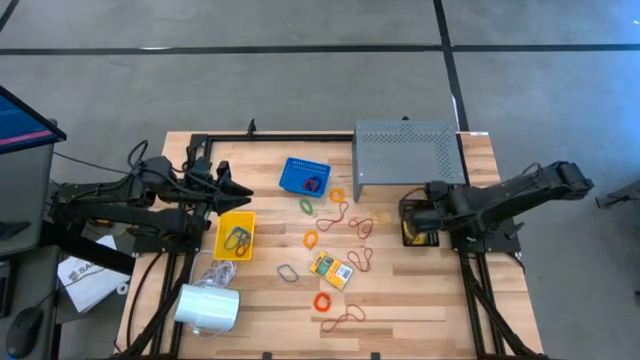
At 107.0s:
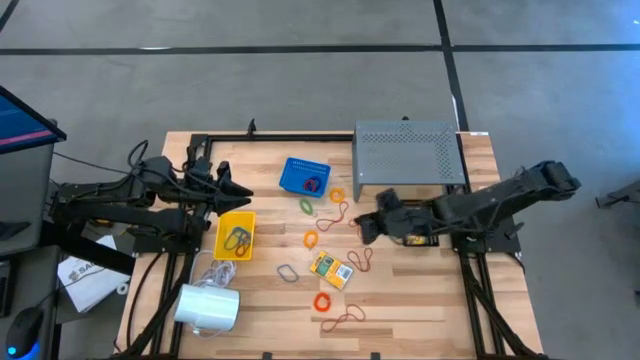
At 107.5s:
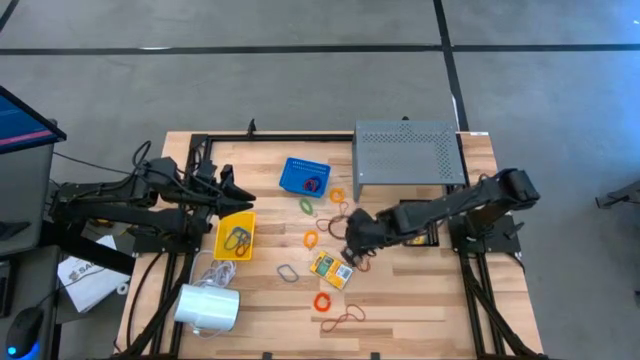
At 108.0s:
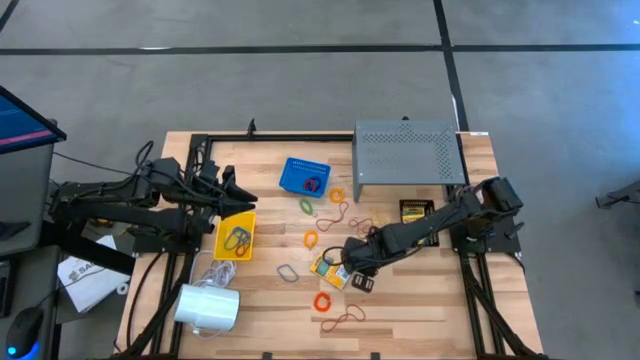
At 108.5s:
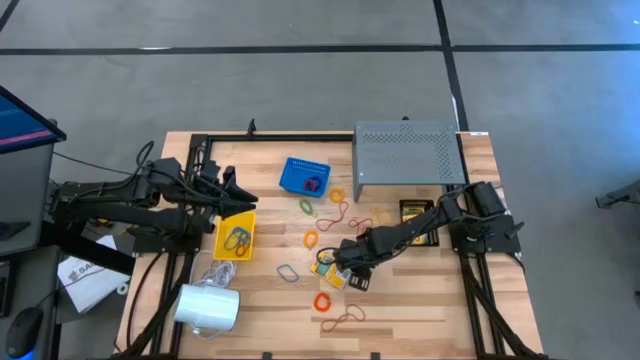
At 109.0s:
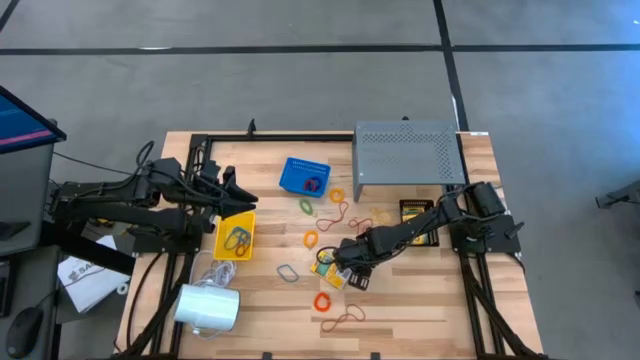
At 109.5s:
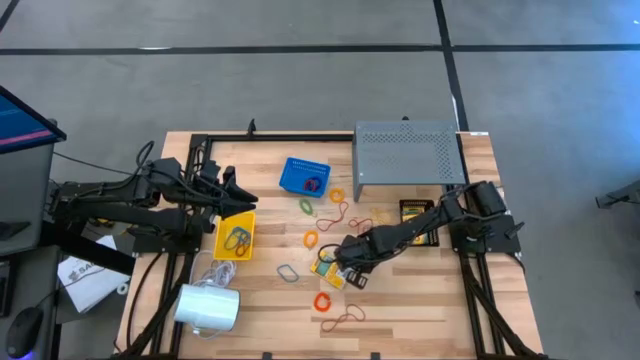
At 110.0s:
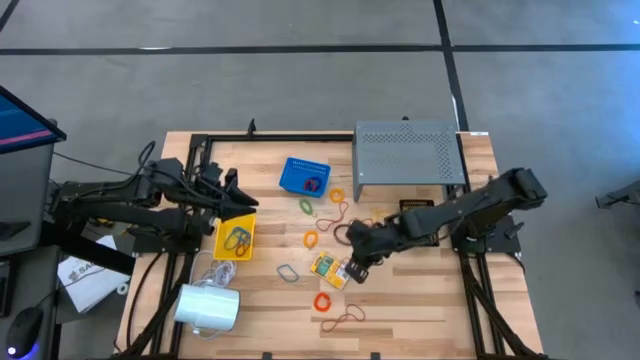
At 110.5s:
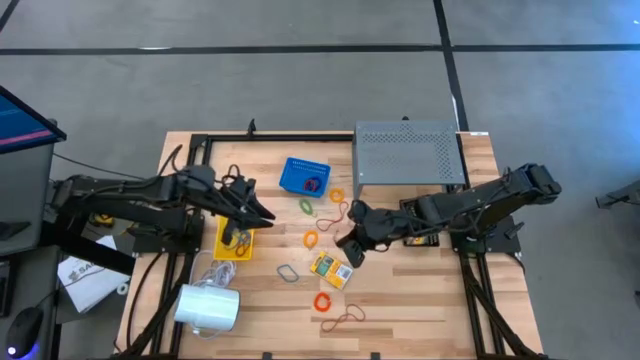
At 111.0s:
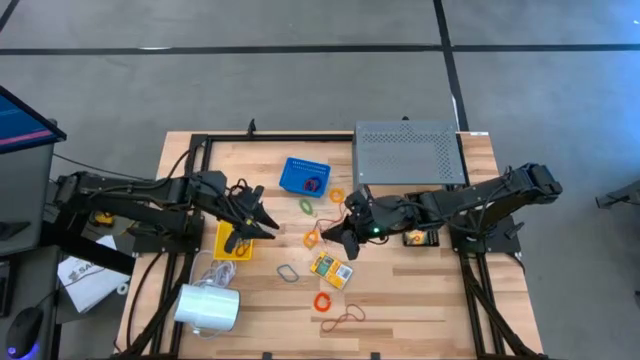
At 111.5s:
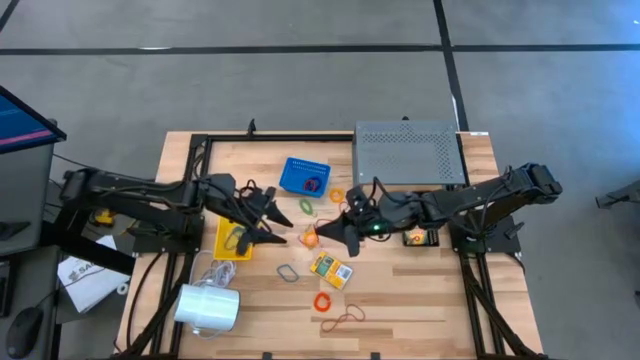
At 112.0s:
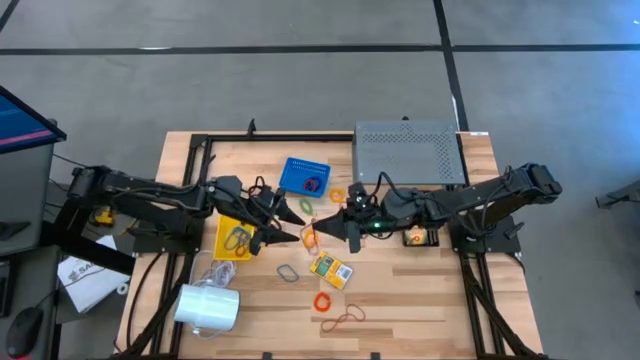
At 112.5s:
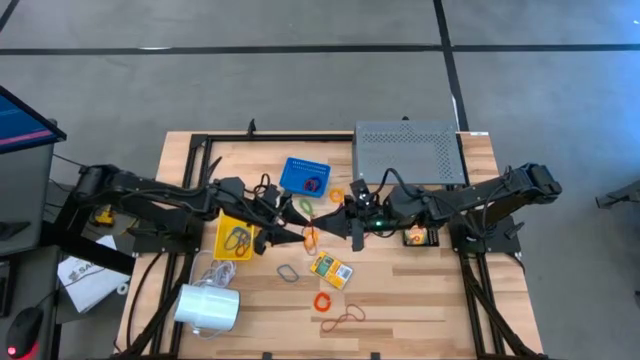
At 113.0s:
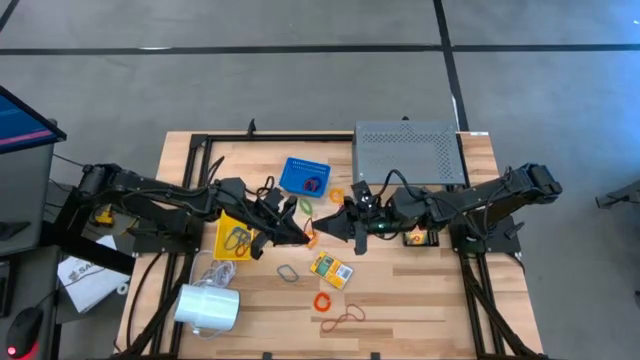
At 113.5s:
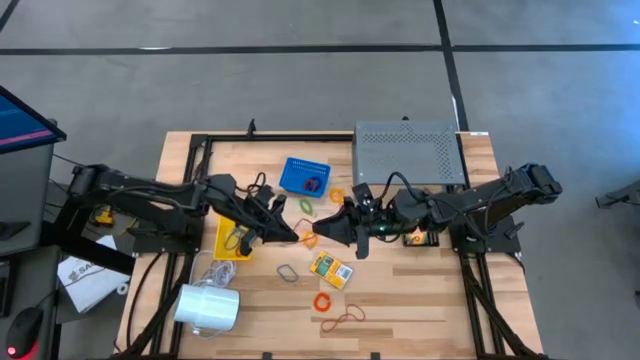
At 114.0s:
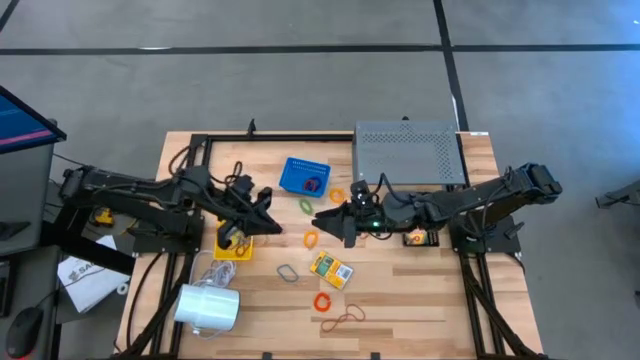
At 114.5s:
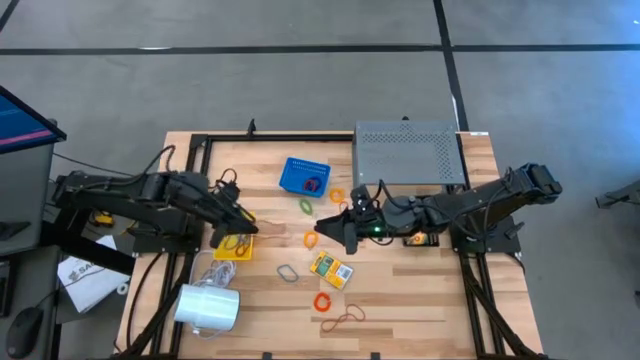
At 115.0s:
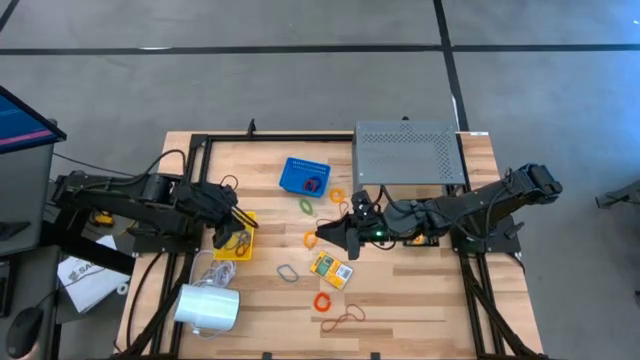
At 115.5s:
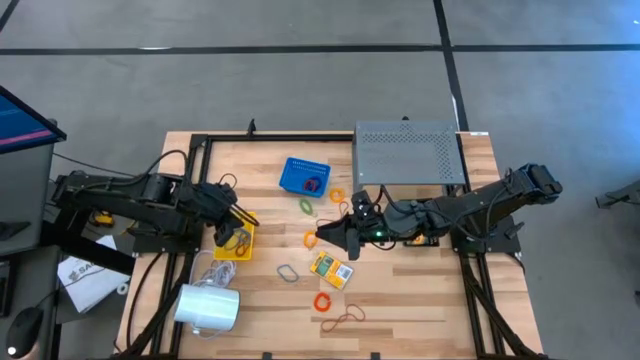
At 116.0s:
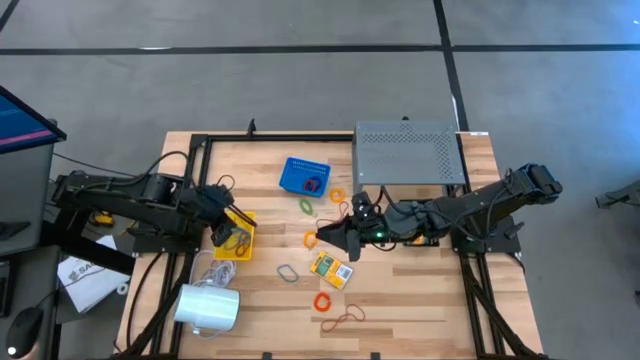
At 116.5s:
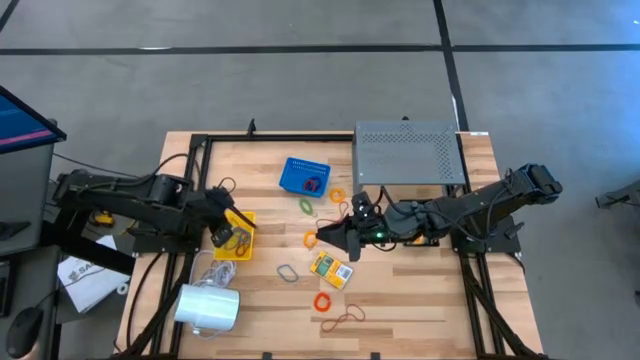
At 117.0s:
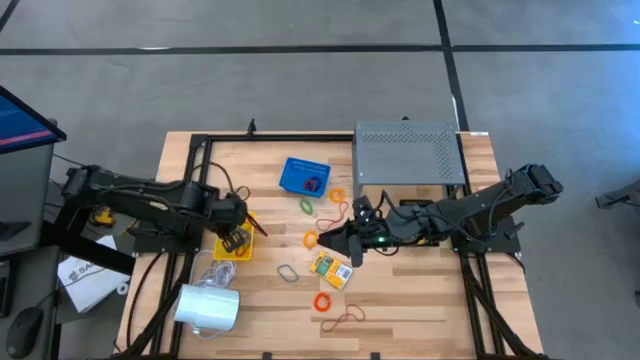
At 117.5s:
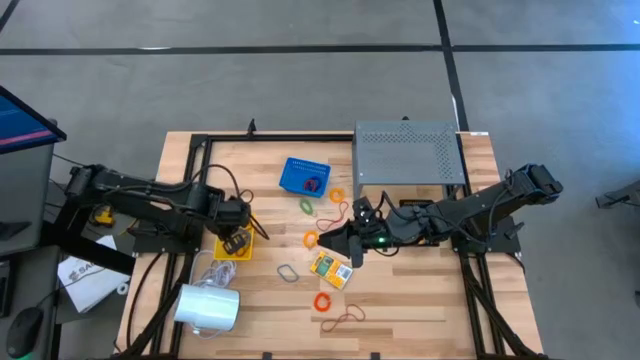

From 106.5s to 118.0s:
Task: Pick & Place Office Desk Supplies
Put the red rubber band into the yellow bin

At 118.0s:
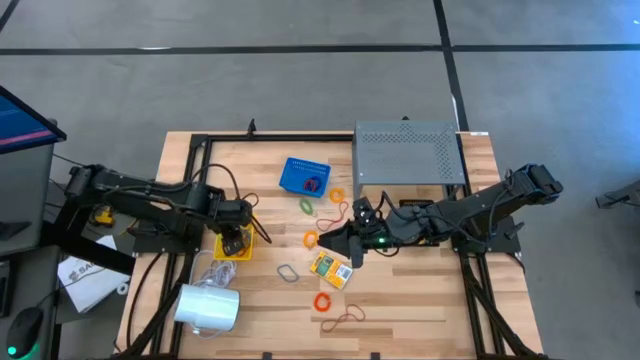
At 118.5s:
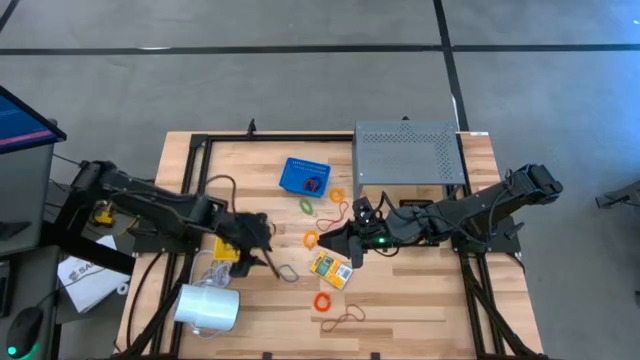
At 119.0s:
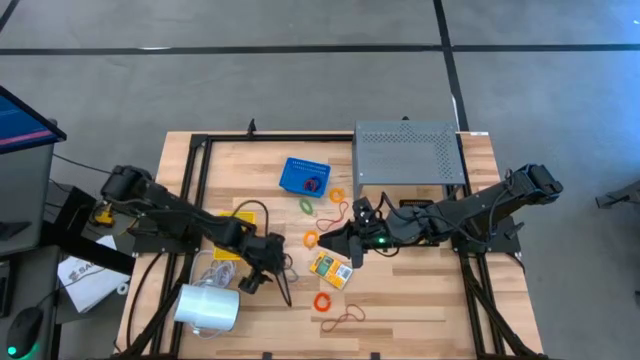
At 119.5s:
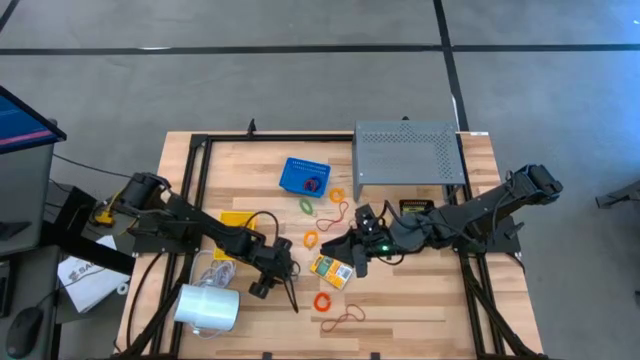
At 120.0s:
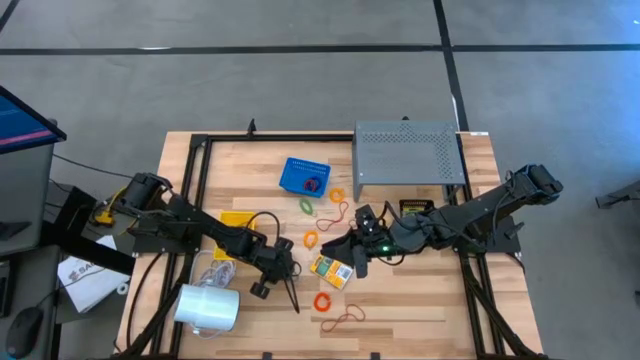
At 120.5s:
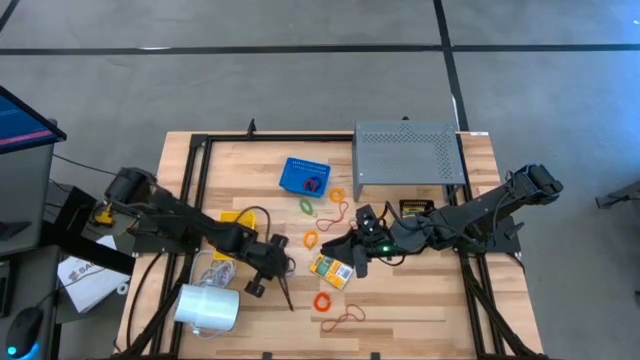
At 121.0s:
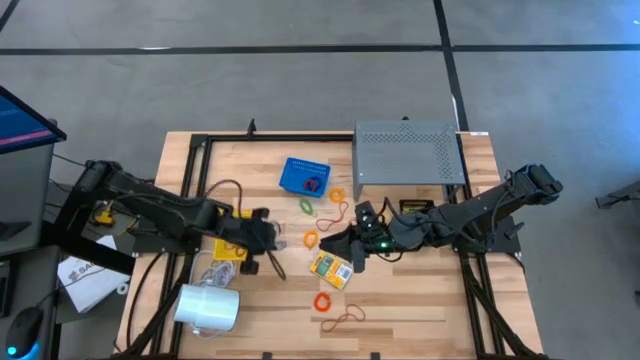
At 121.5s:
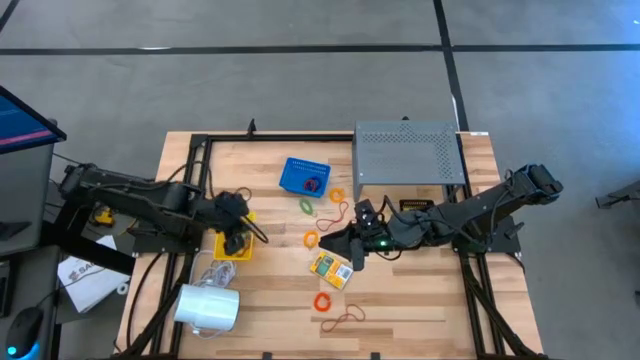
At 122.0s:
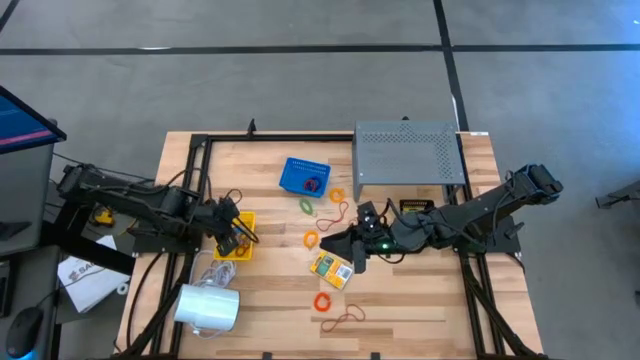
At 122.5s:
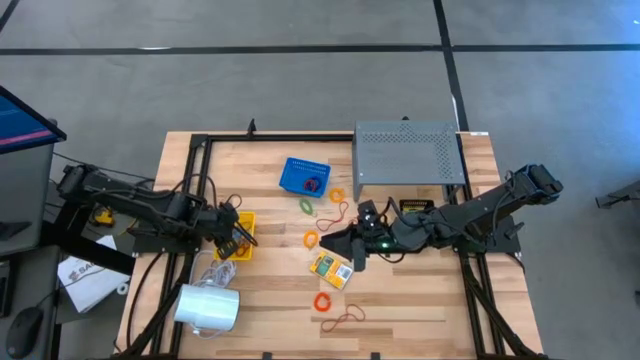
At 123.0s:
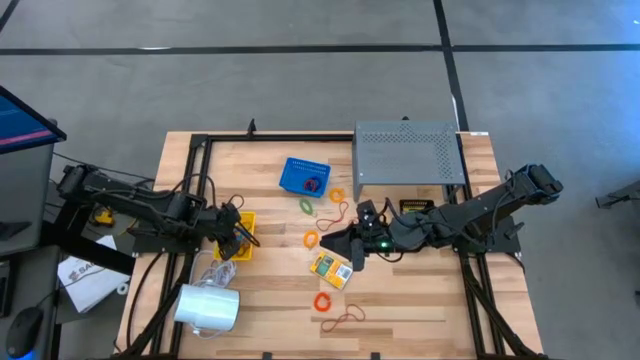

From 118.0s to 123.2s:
Put the blue rubber band into the yellow bin

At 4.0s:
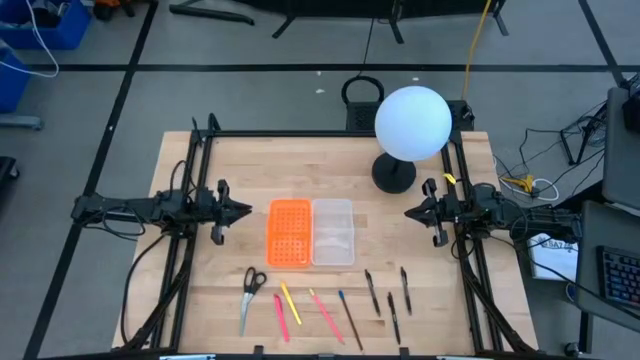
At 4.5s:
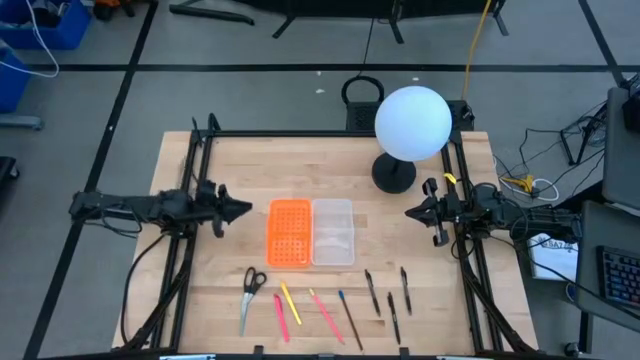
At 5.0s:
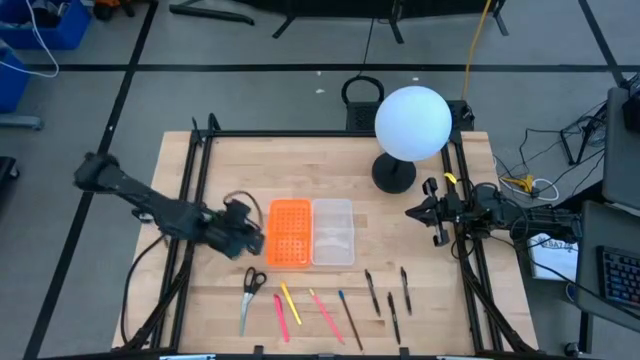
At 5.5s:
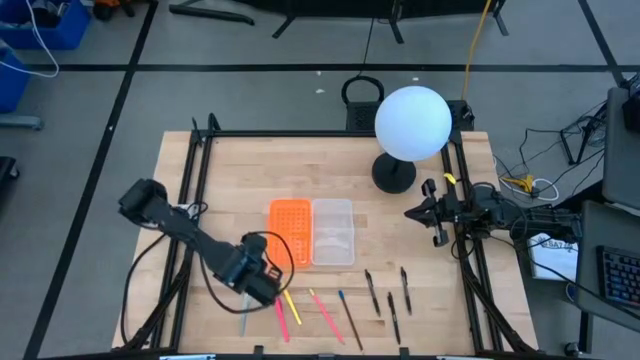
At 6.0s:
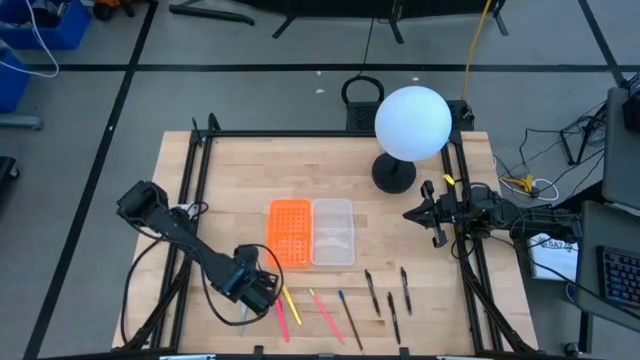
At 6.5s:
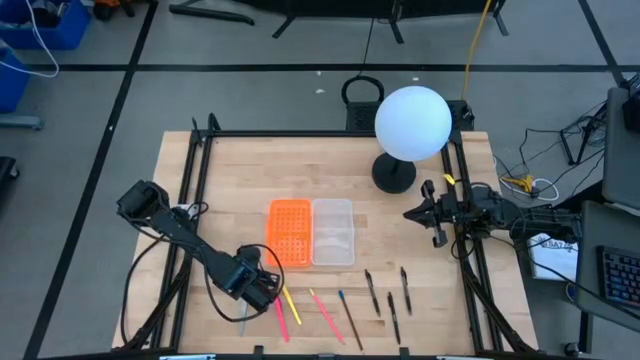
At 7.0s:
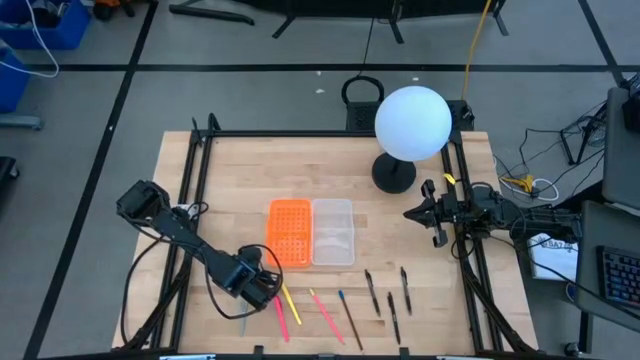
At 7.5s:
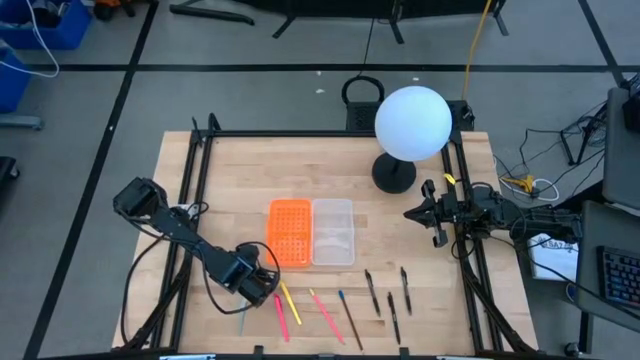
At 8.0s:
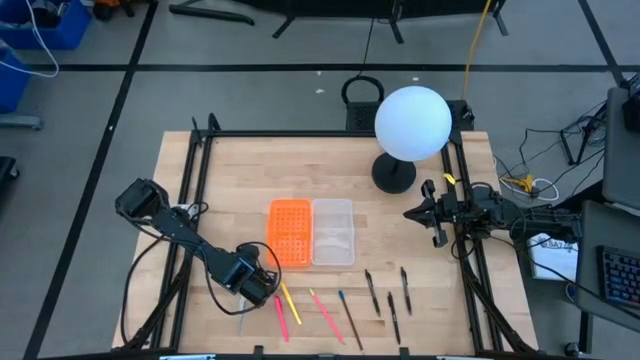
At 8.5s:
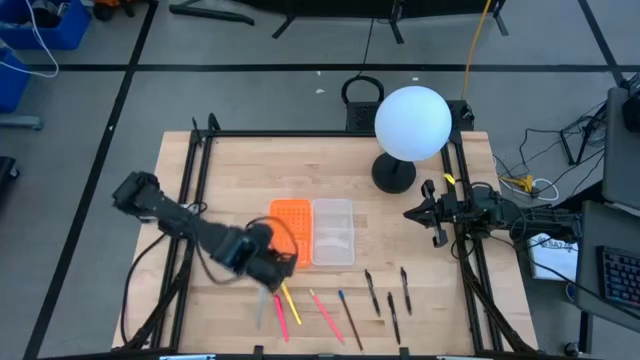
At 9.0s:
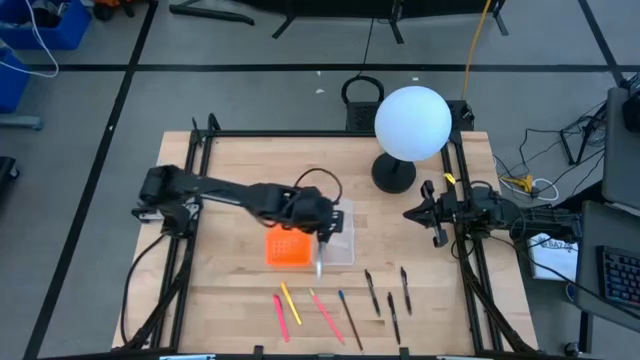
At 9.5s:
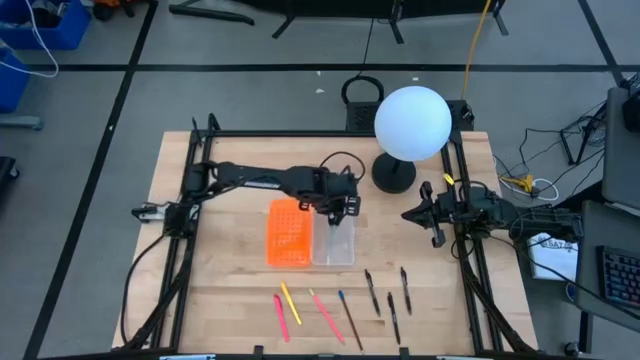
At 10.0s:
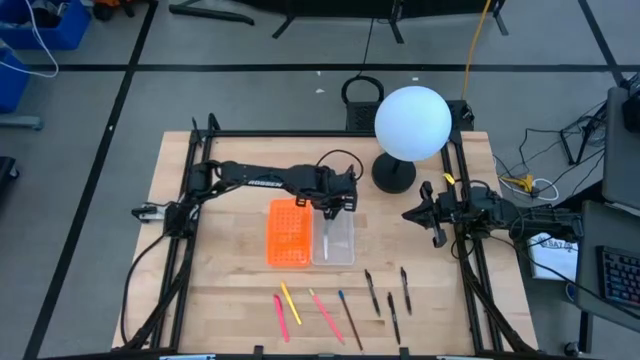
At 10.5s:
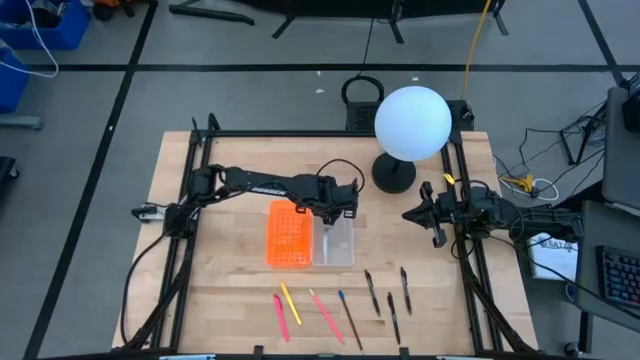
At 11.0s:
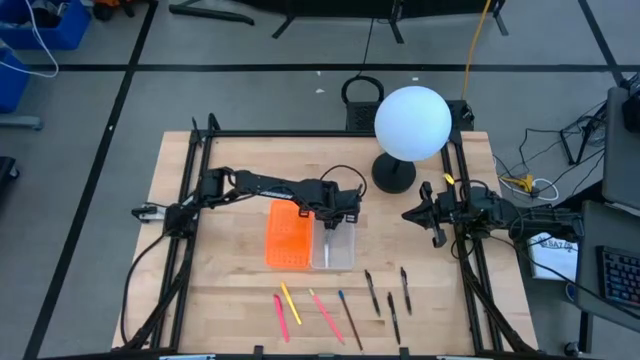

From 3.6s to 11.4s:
Task: Pick & place school supplies into a supply box
Put the black scissor into the orange supply box
